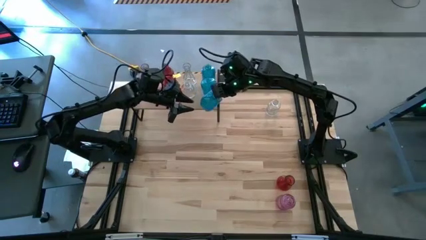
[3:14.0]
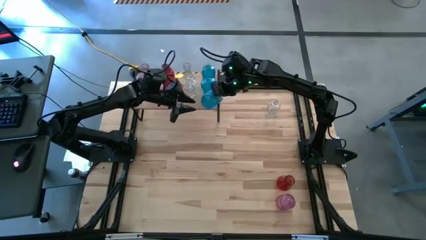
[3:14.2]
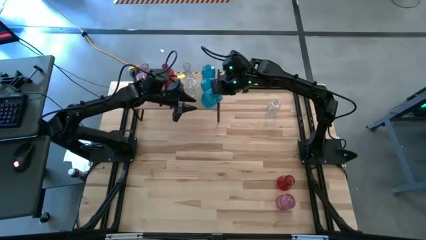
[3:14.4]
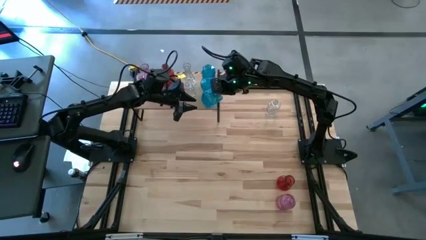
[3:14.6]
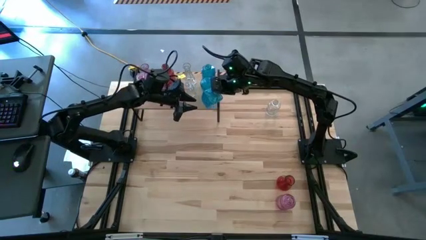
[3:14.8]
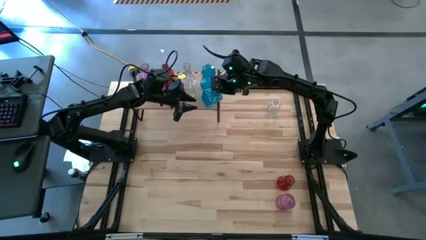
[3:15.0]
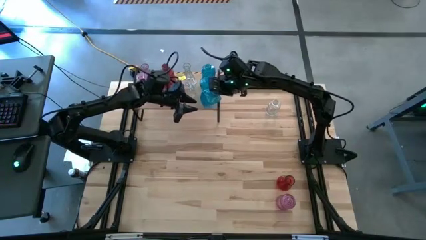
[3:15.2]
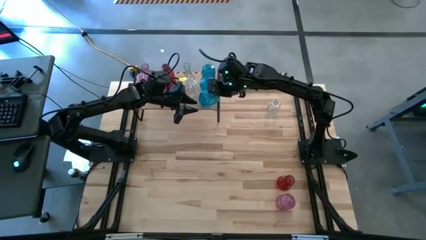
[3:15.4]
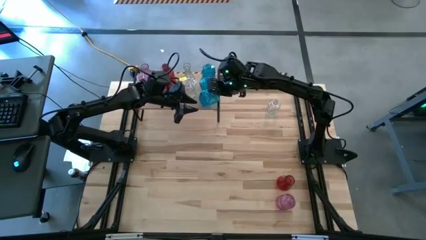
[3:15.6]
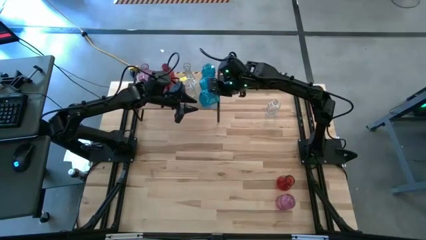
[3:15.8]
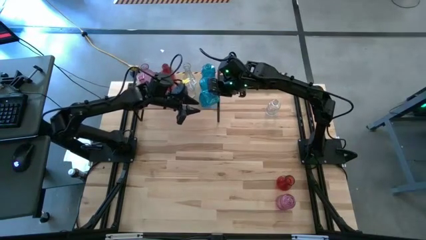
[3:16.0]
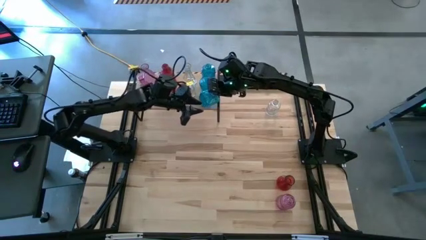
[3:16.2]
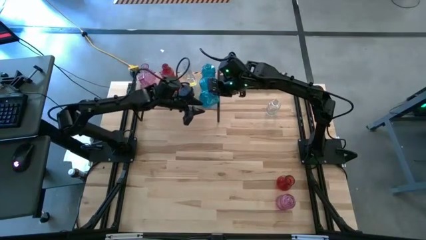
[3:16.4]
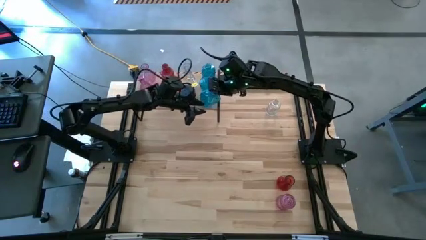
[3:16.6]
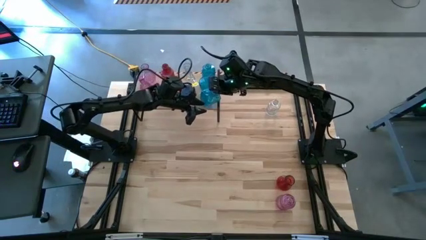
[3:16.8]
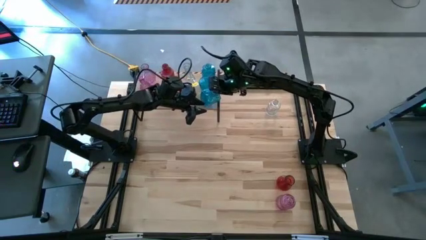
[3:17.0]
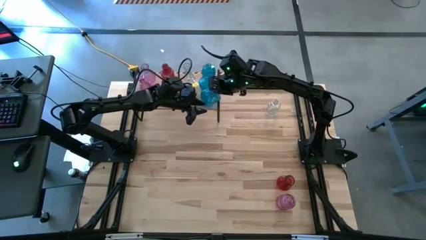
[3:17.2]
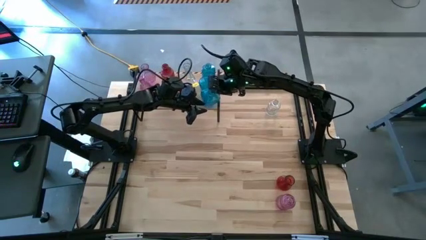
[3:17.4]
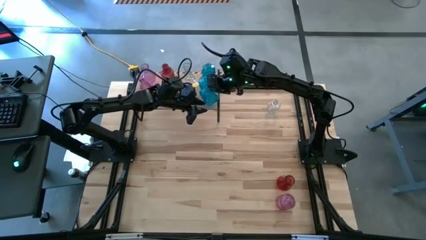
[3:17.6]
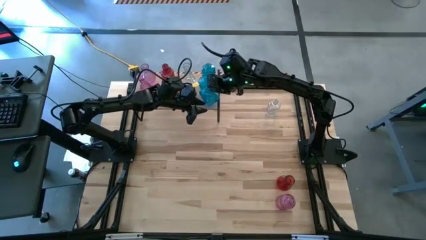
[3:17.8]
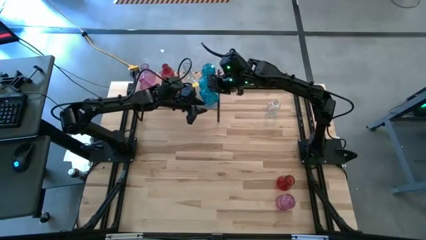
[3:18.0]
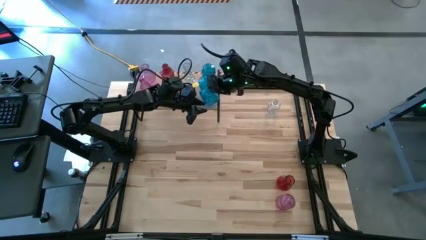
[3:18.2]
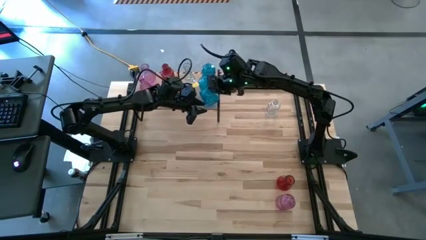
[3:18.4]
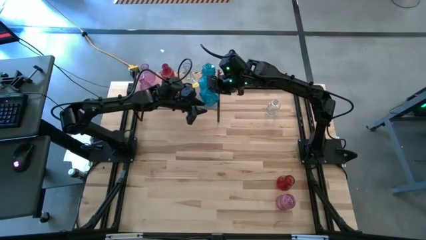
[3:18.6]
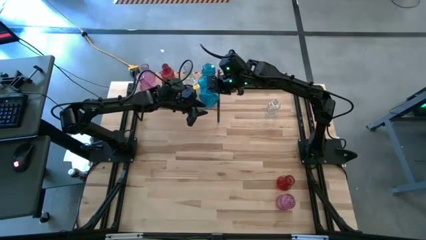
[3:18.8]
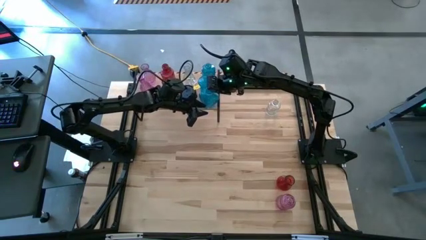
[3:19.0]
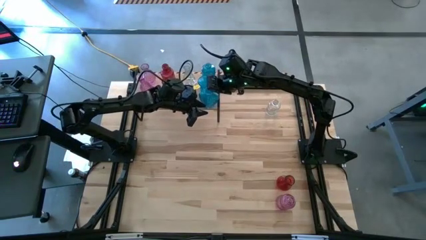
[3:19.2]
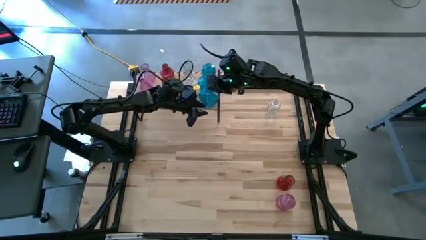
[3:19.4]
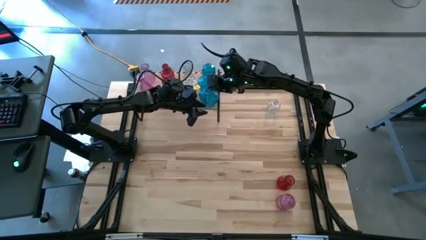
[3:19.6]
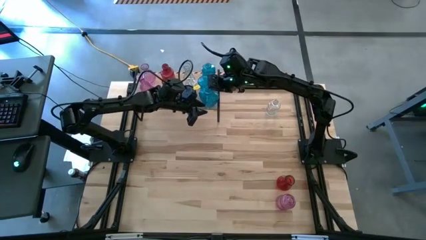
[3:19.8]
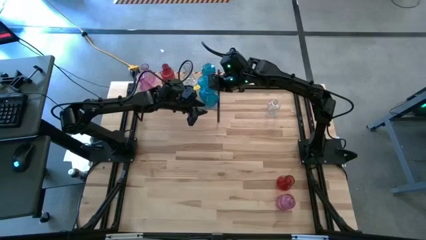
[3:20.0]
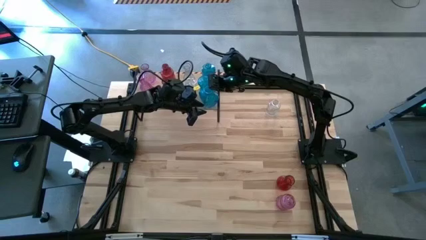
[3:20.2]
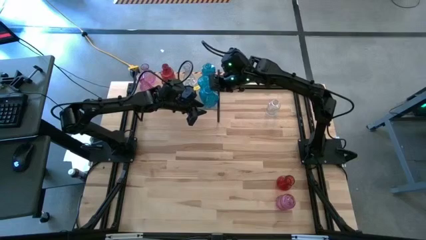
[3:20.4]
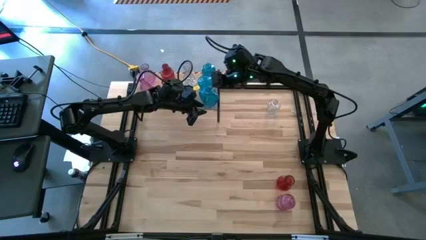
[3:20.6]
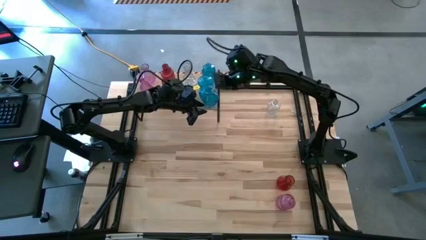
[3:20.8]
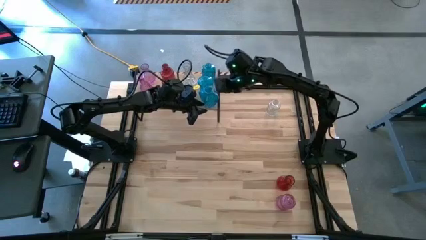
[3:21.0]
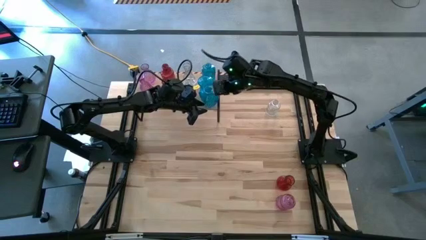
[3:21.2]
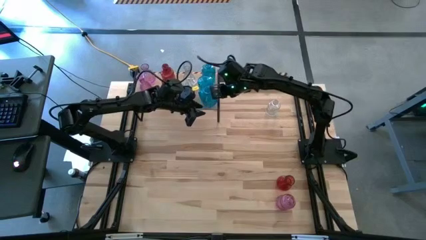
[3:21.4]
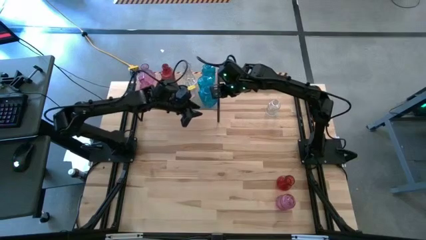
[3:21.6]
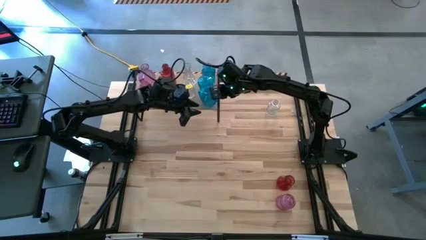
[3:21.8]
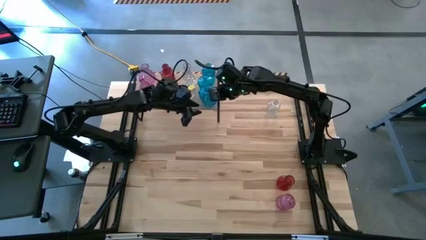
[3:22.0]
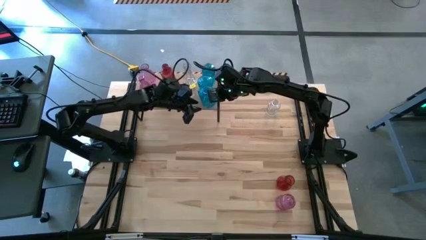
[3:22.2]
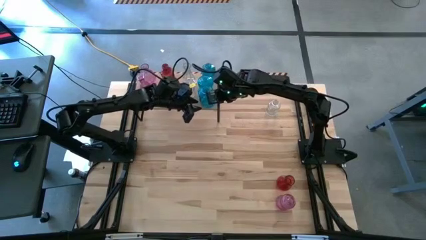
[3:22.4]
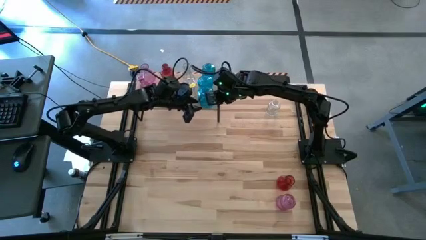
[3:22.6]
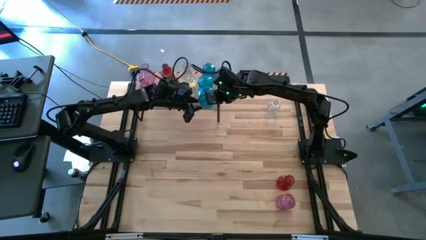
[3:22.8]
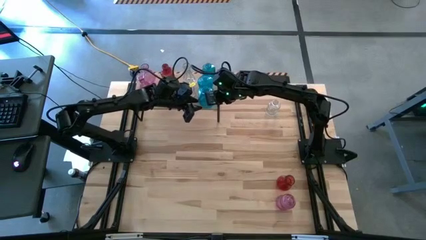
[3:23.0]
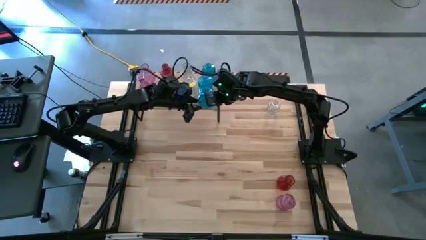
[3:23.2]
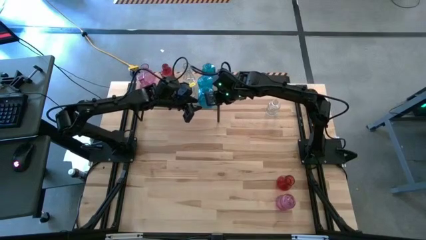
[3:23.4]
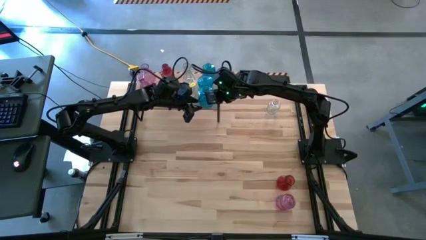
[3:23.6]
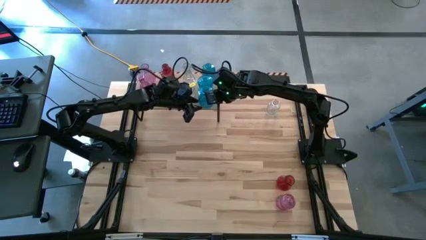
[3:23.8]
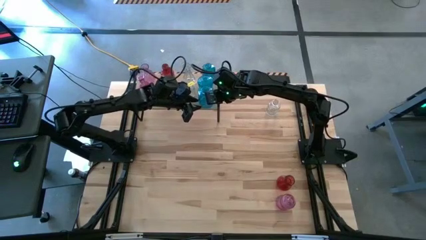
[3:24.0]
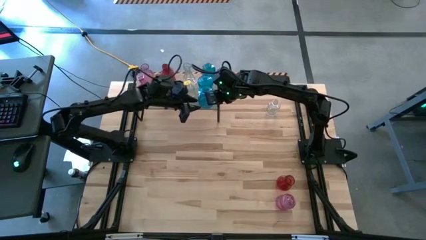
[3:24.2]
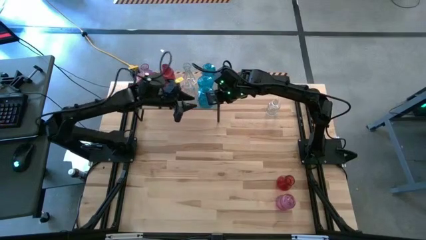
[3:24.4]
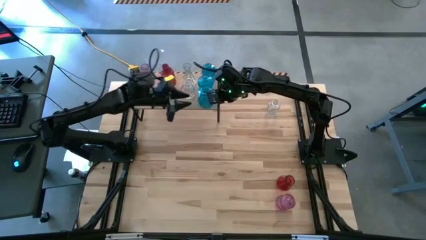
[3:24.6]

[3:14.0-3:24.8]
Task: sort vases onto shelf
Put the blue vase on the shelf aligned with the other blue vases

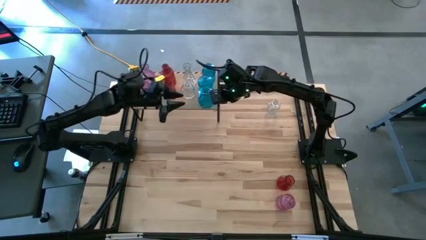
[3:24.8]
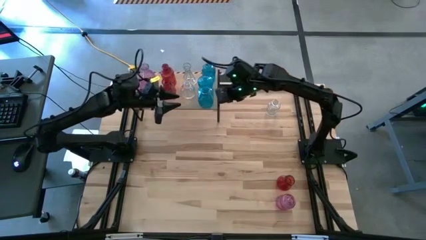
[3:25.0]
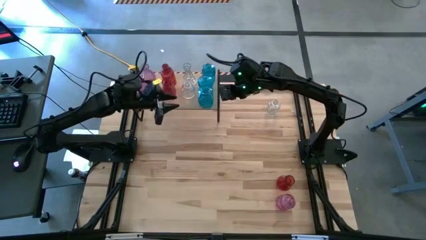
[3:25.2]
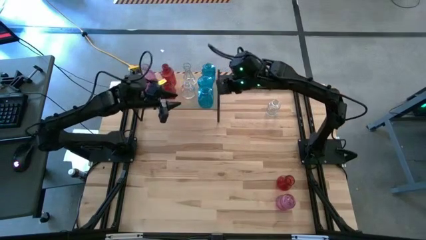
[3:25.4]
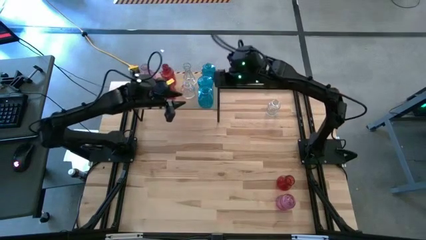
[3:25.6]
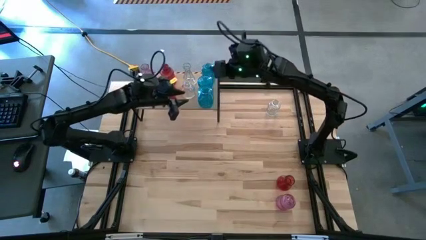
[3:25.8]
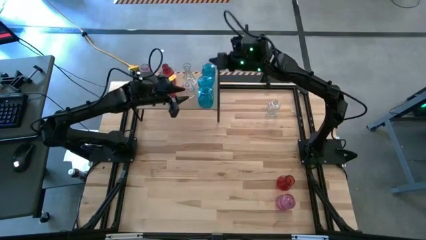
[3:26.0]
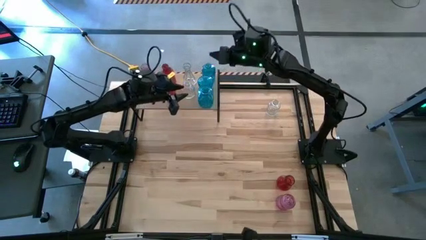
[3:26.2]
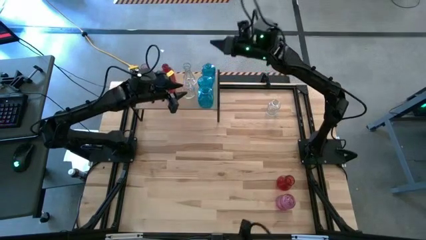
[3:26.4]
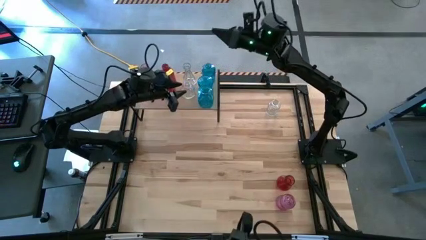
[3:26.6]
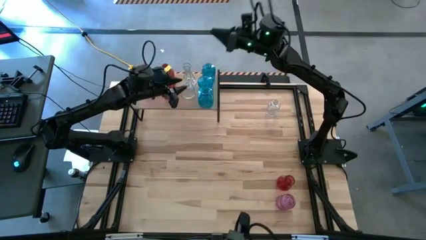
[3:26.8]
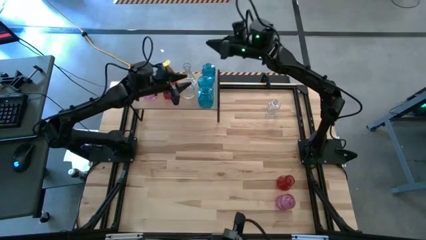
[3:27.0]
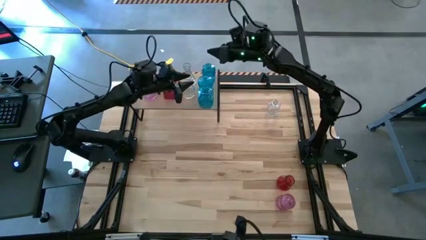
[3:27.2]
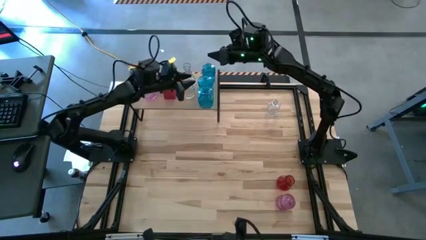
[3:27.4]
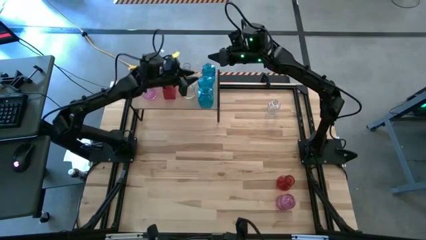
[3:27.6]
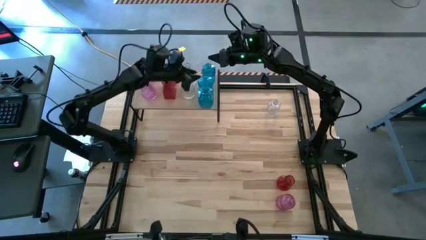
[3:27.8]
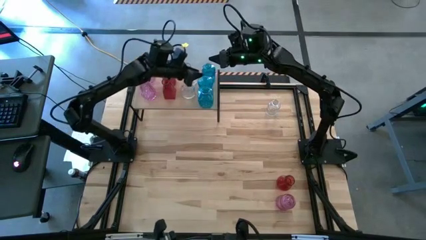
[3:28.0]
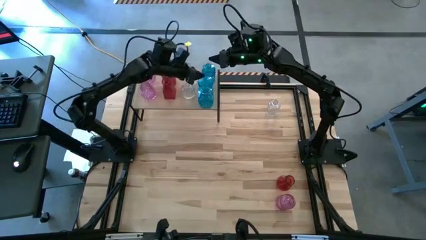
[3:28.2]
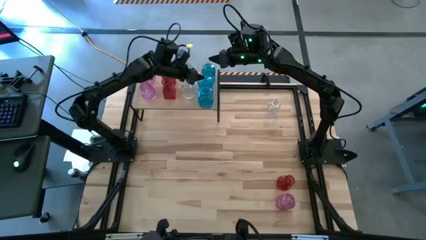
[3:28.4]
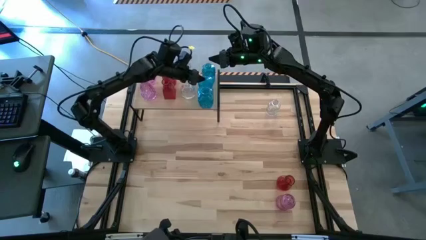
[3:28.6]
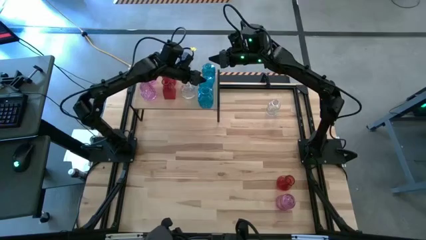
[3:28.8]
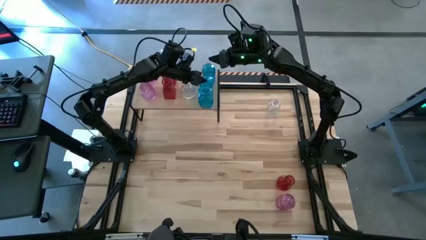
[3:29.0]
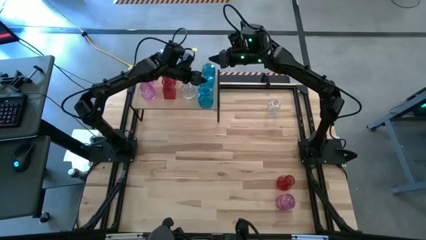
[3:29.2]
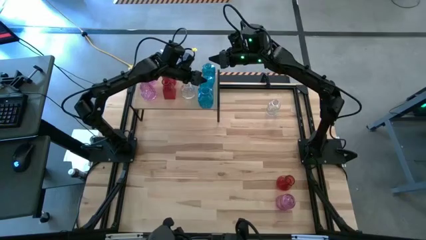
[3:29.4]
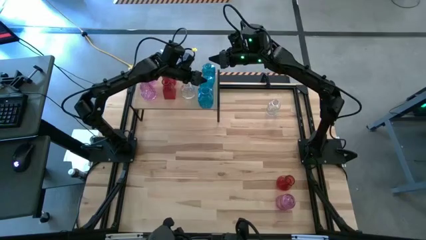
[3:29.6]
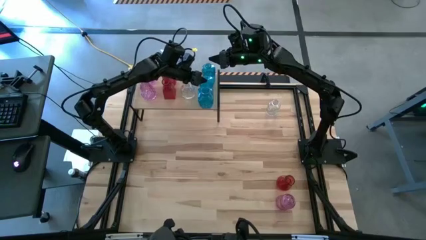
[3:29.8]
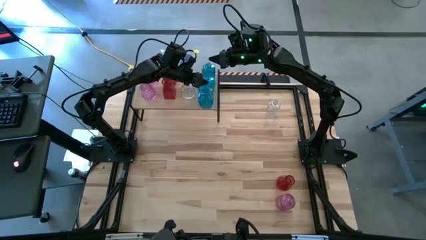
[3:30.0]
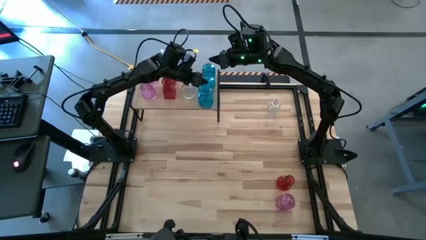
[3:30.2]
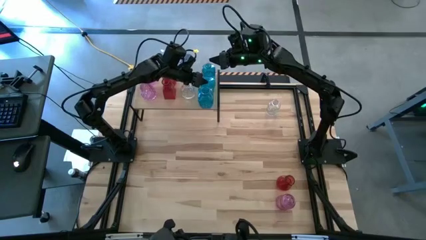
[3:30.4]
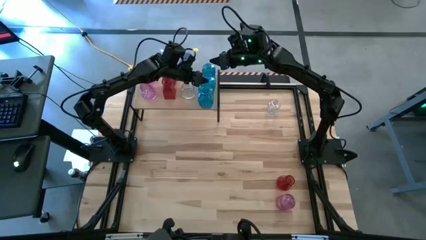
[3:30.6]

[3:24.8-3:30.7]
Adjust the blue vase on the shelf
